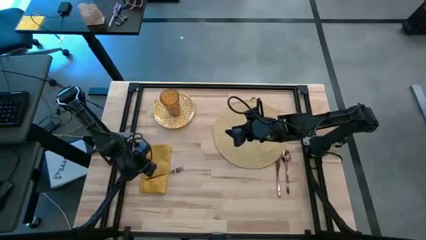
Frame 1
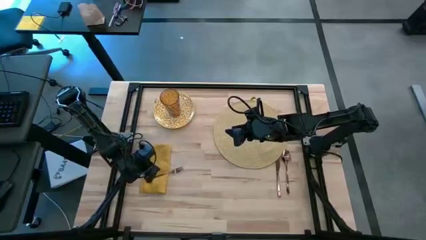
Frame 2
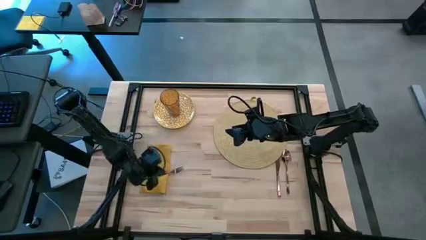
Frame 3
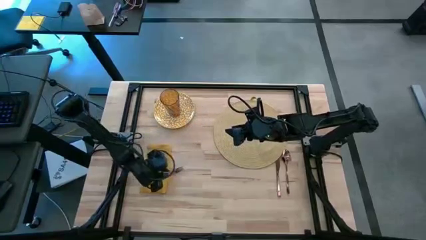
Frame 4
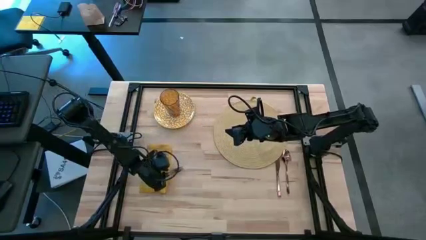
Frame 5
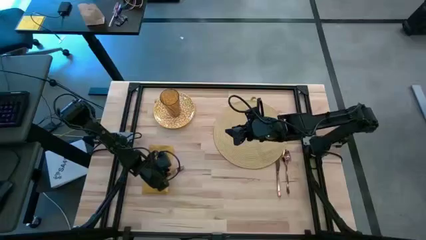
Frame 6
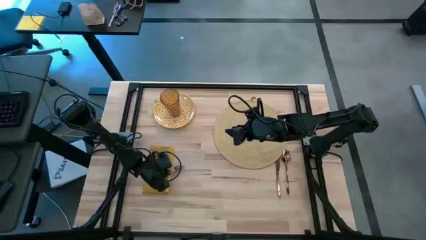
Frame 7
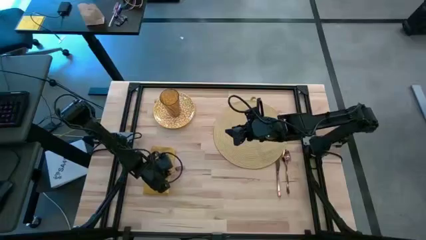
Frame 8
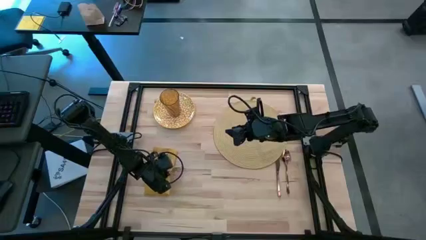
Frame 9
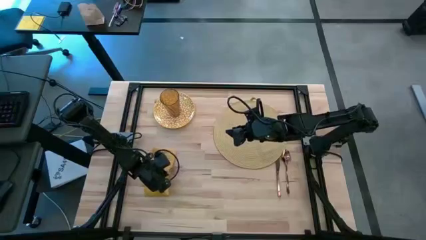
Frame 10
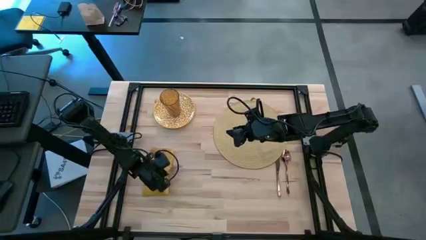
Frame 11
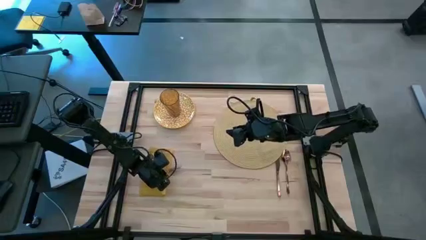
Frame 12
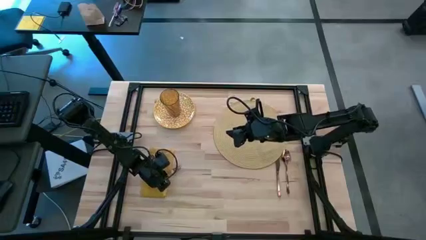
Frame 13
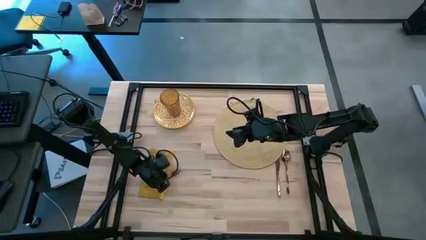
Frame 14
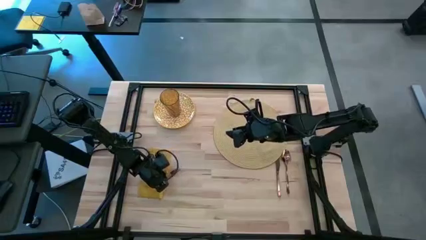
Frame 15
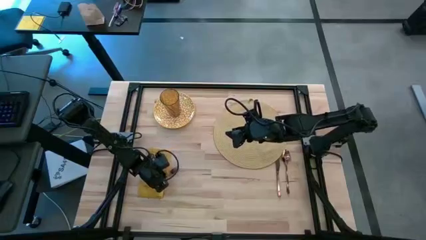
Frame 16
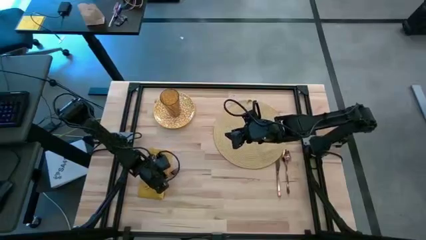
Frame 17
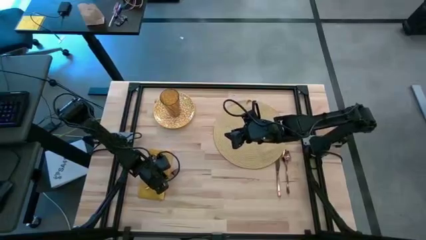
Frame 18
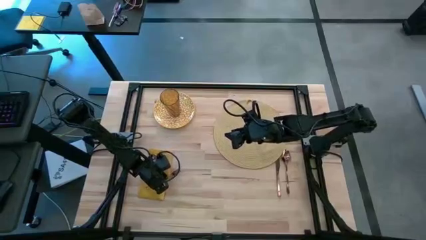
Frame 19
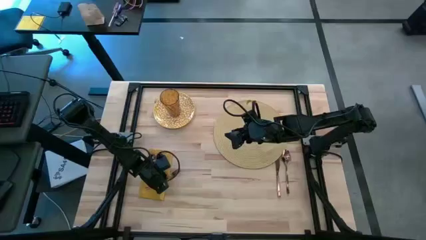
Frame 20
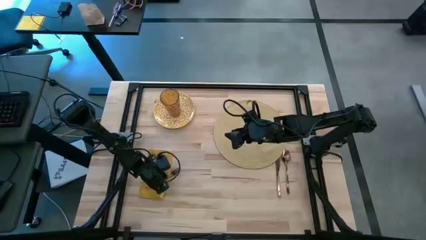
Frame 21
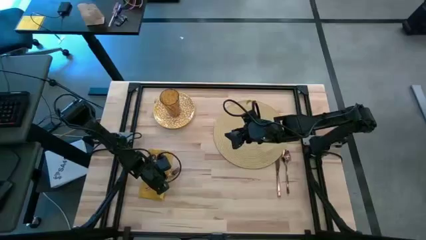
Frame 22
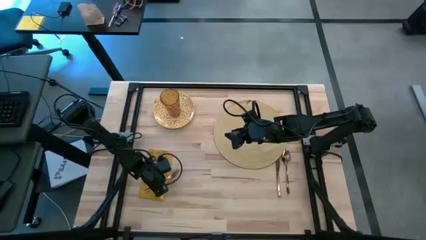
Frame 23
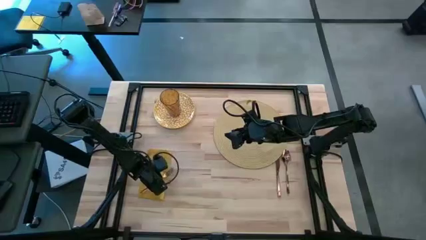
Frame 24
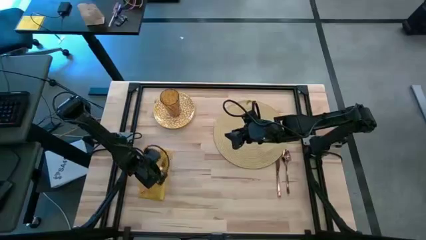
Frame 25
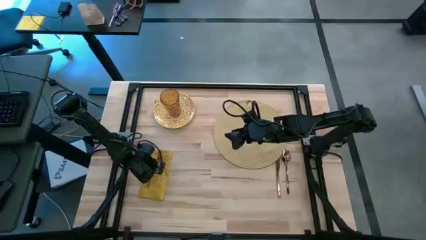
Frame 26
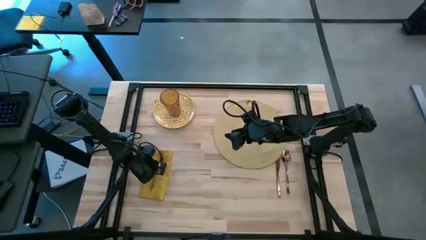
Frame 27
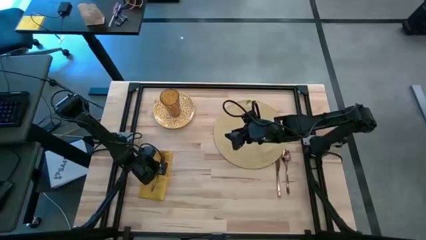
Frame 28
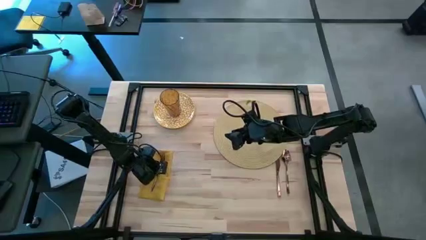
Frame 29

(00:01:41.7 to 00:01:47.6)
Task: Set table place
Put the bronze fork on the yellow table napkin

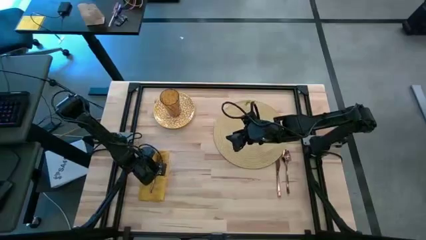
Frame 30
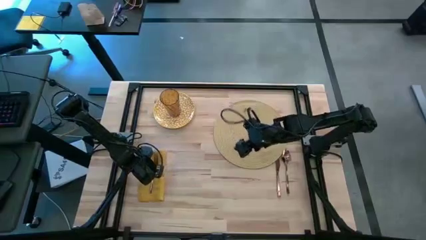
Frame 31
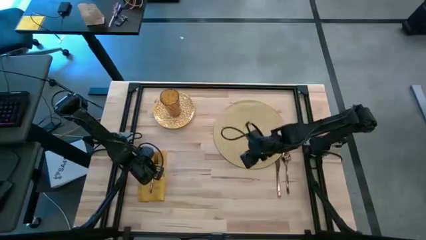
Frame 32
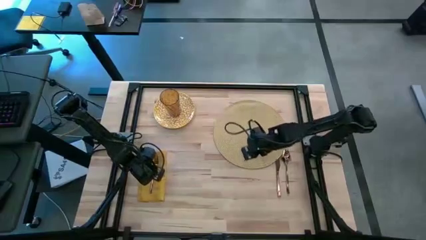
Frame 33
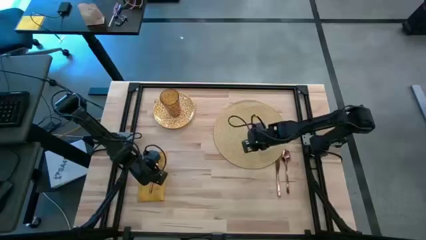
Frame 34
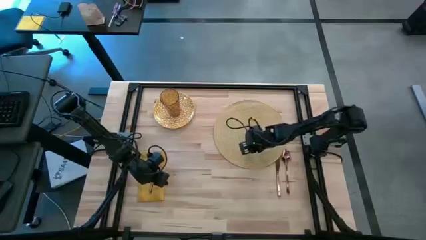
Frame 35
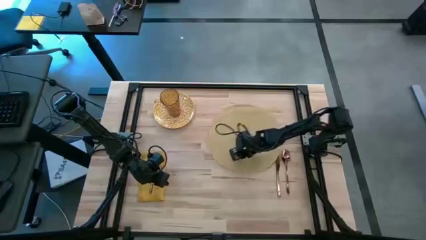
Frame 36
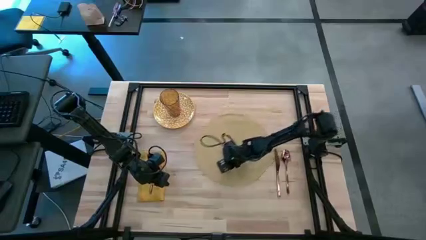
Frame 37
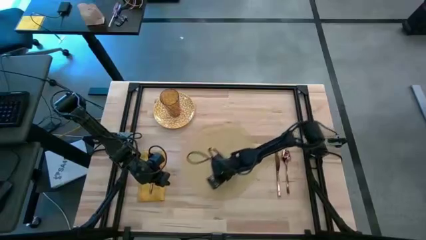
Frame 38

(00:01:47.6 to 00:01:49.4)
Move the brown placemat to the center of the table

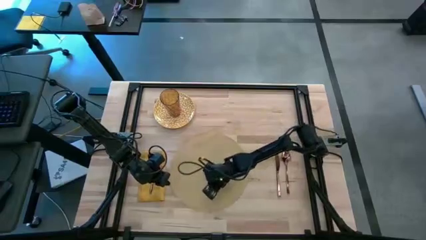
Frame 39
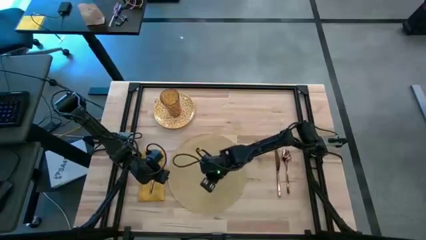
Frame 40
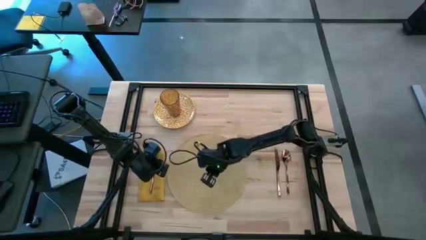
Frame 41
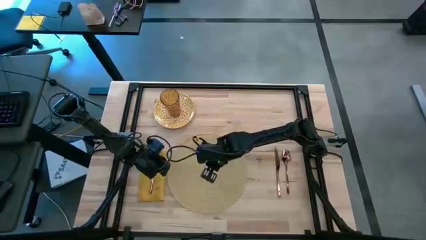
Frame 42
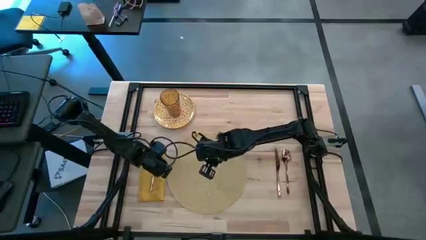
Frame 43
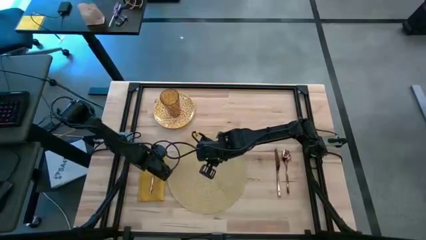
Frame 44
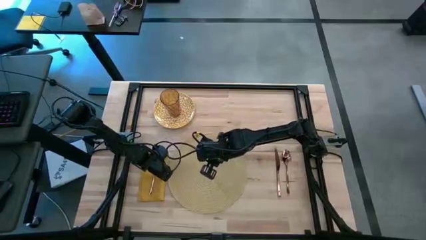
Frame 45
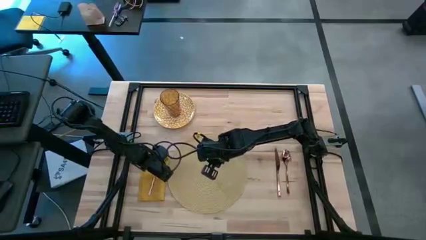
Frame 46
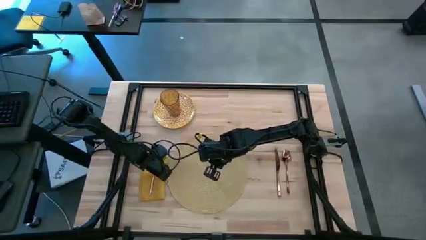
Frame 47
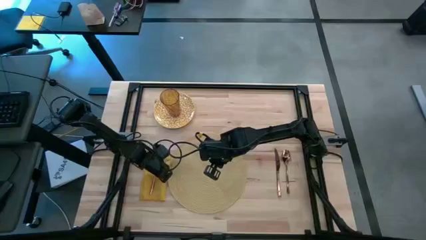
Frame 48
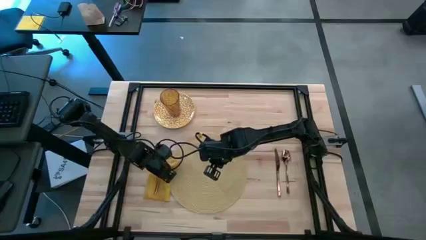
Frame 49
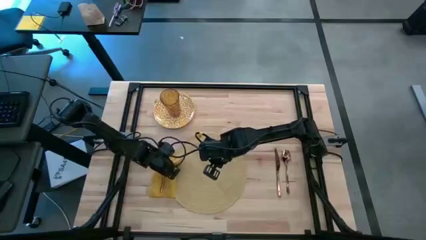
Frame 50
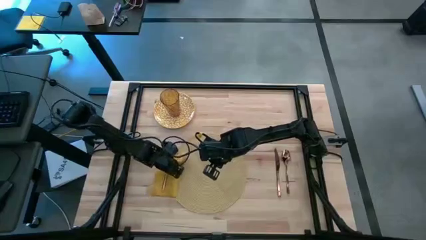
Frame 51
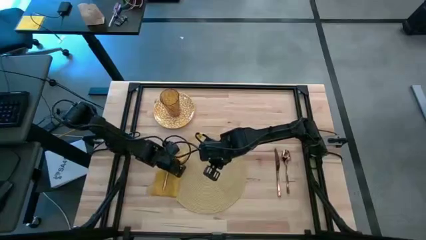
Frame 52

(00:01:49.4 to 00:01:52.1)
Put the yellow table napkin on the brown placemat

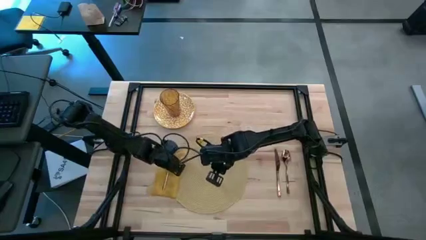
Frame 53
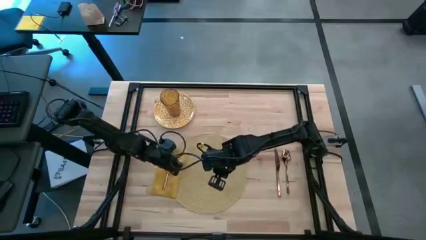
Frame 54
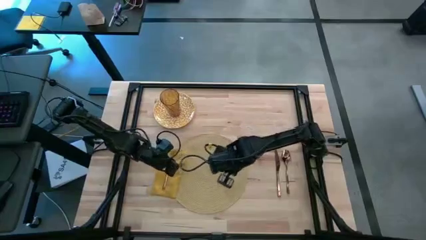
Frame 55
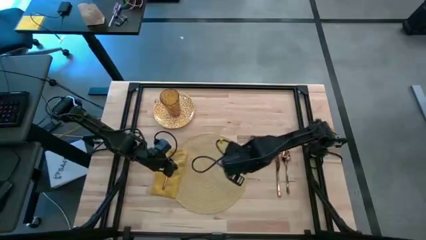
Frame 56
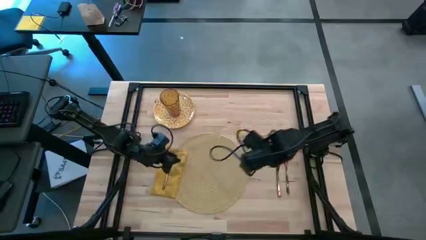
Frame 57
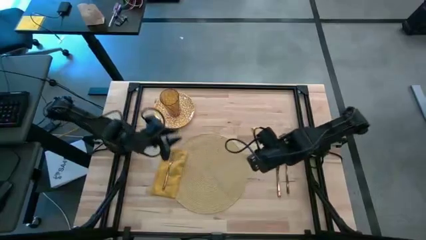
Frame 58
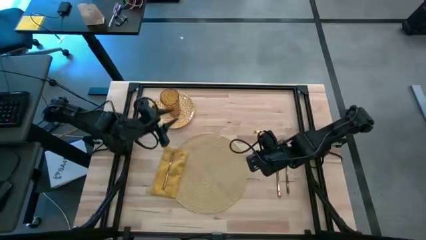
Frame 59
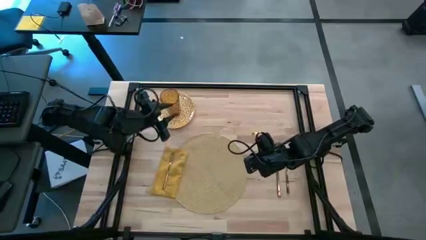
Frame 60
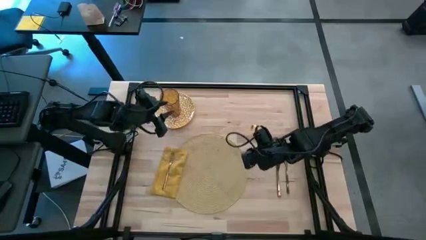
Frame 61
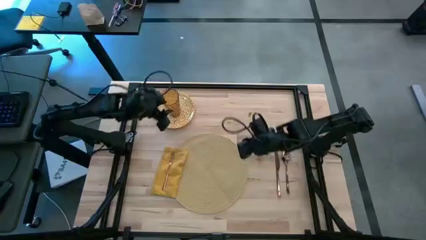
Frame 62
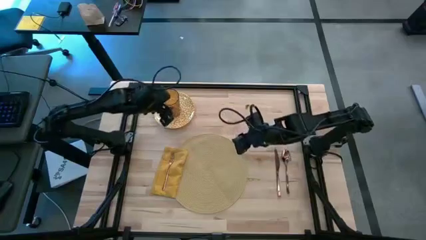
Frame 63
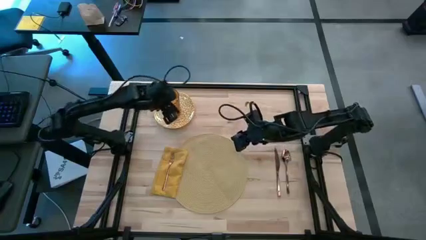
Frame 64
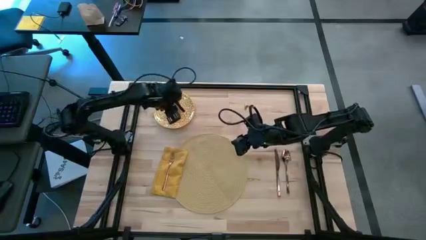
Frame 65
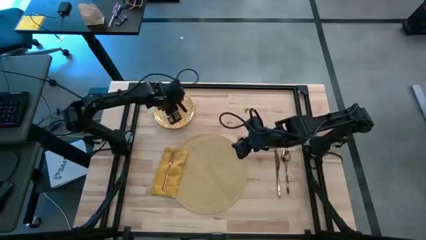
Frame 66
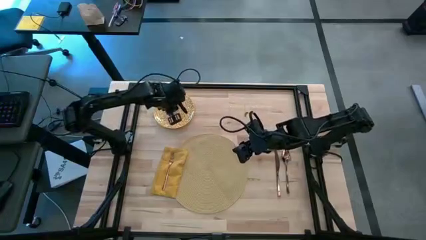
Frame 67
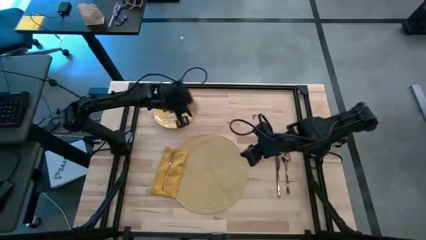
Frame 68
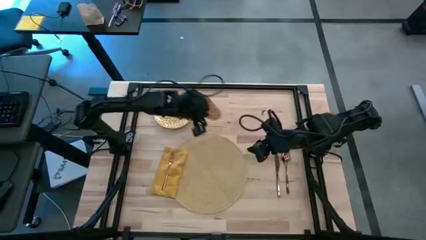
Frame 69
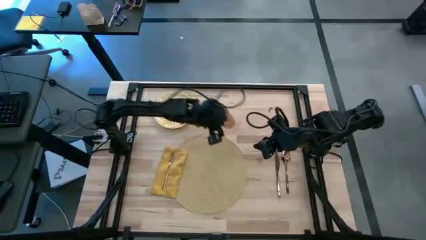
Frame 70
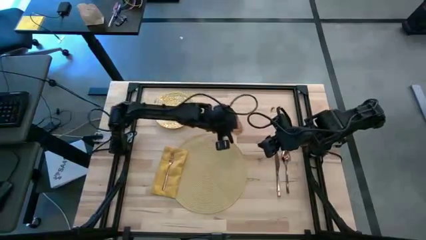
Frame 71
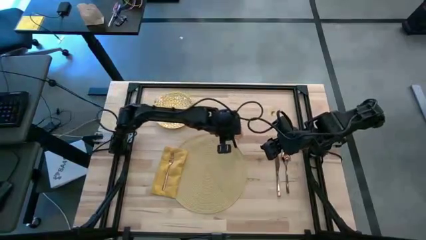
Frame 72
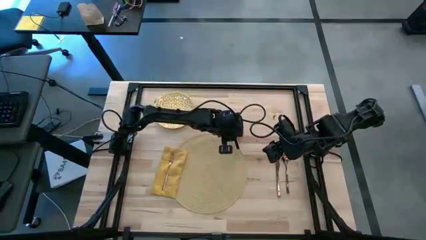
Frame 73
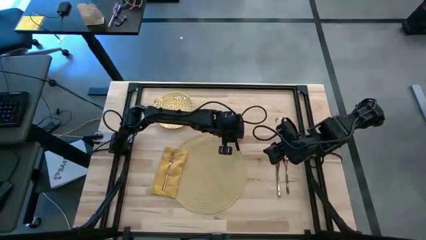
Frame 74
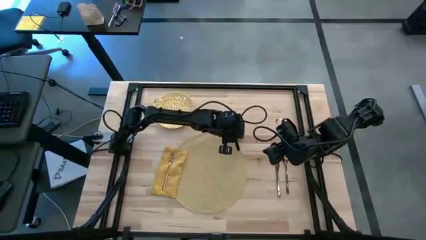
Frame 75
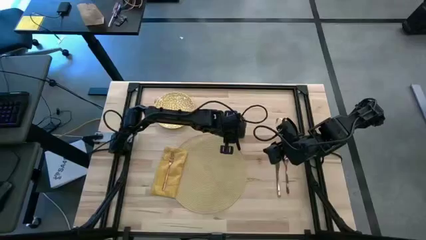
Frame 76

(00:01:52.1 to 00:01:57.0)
Move the brown glass to the top right of the brown placemat
